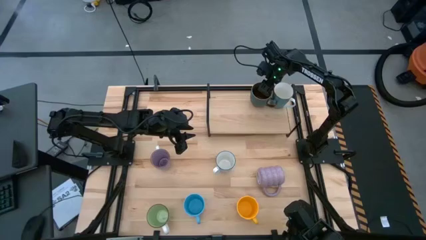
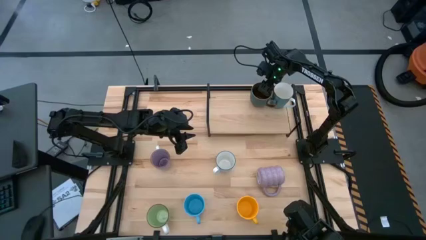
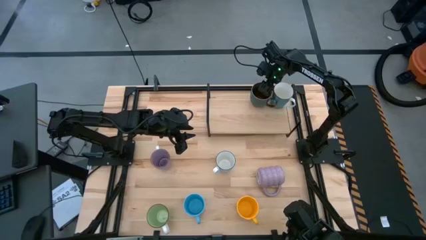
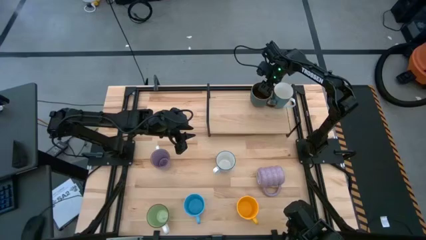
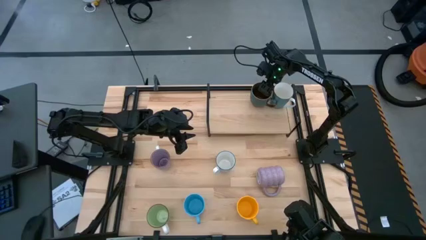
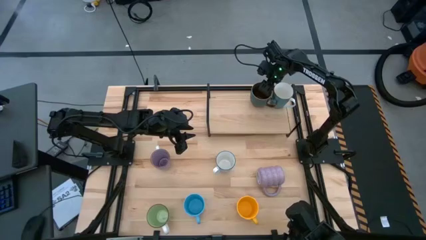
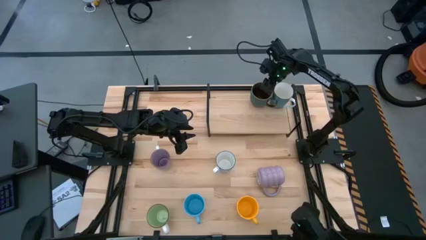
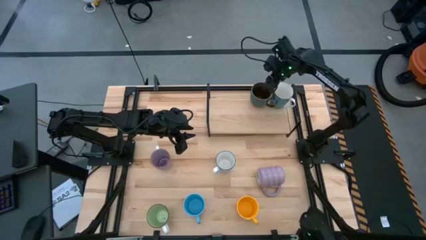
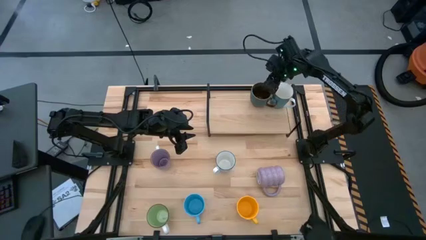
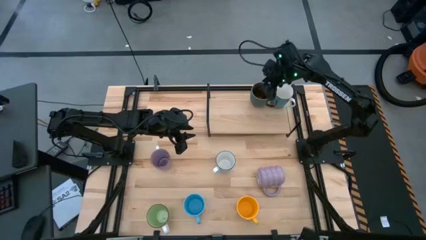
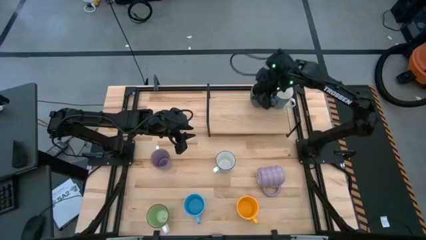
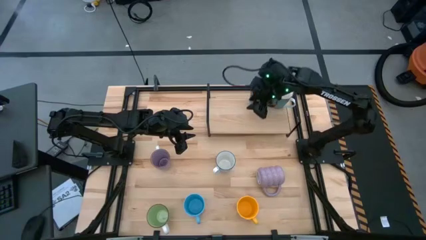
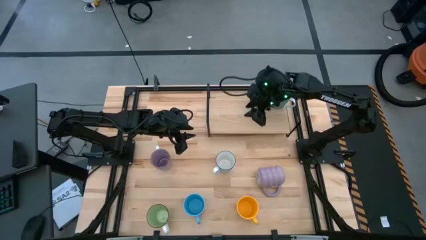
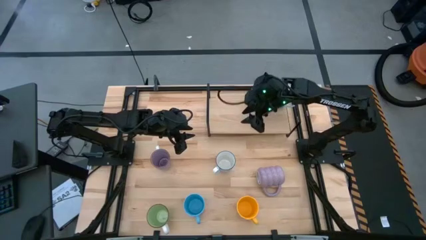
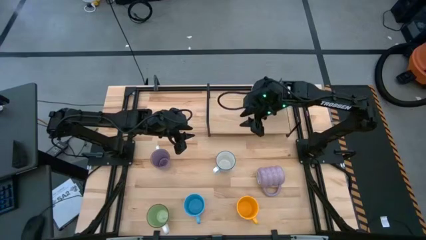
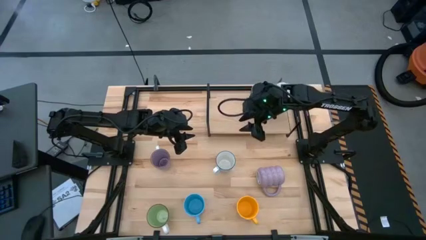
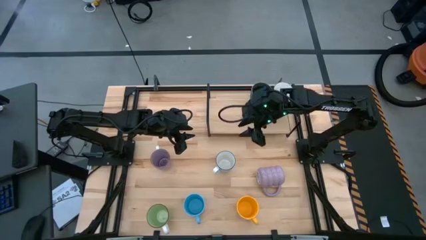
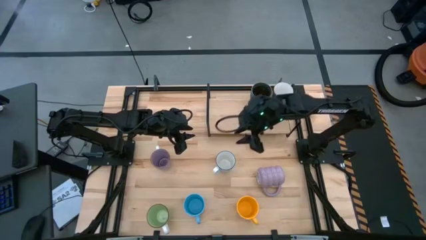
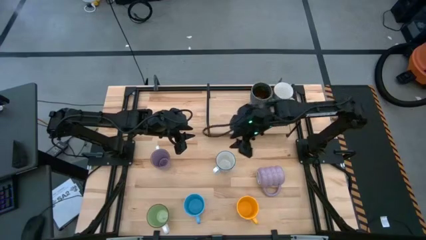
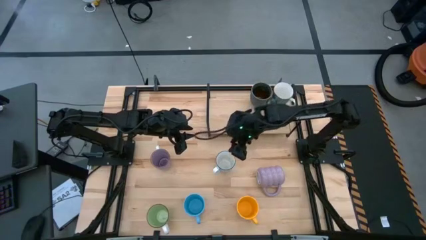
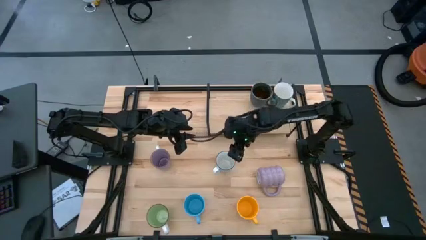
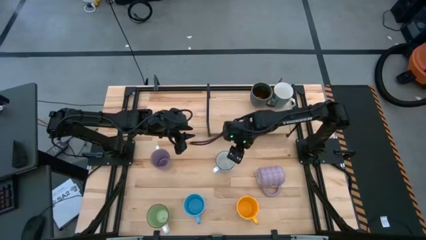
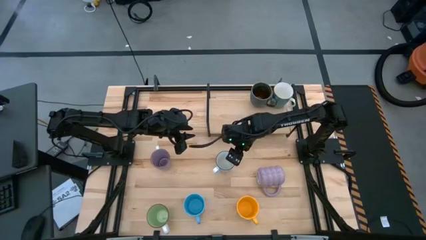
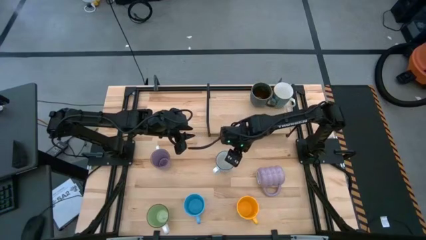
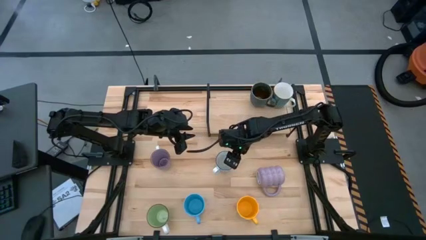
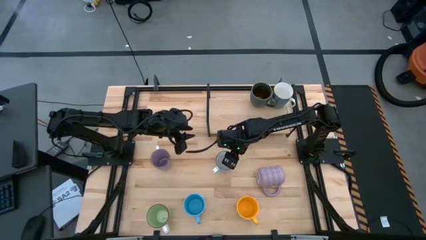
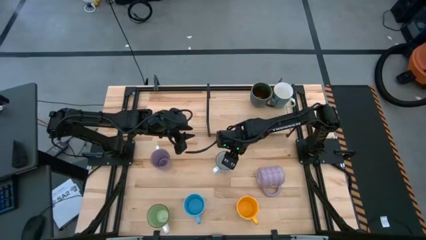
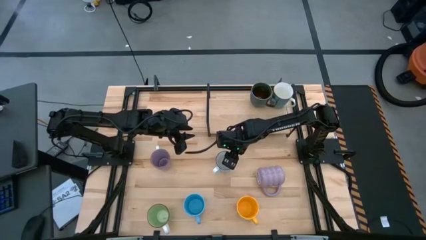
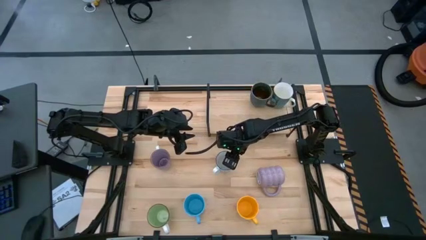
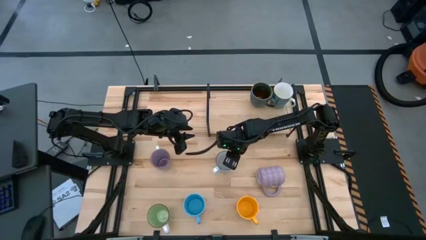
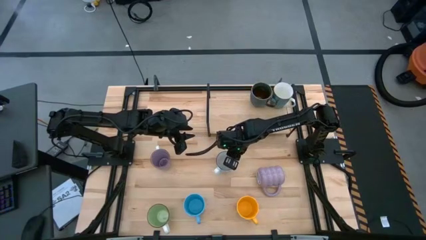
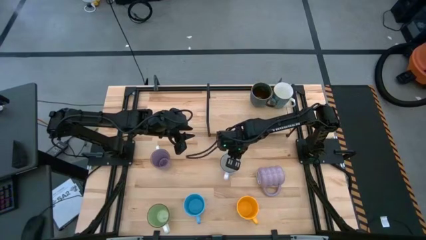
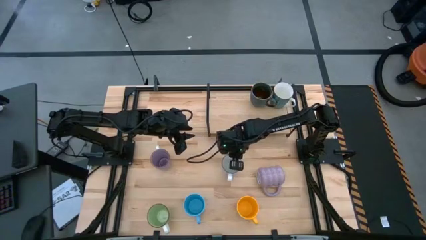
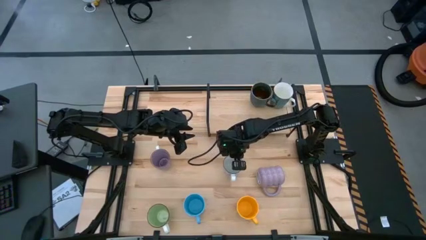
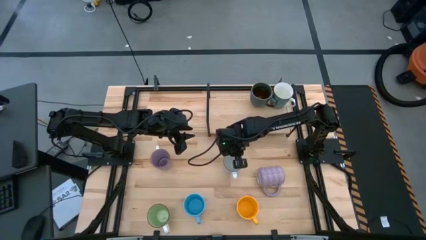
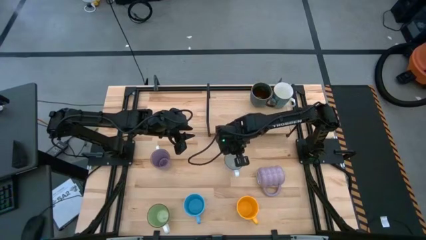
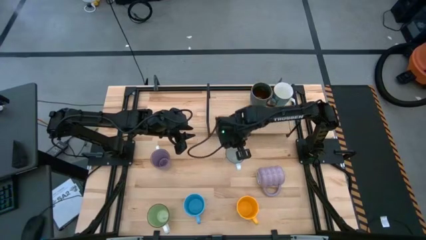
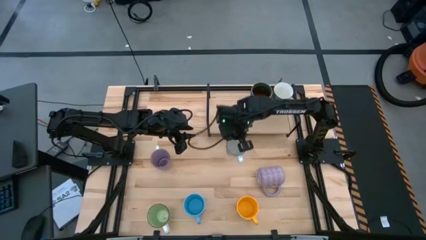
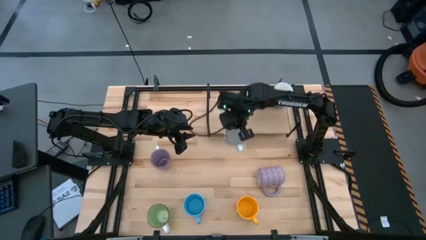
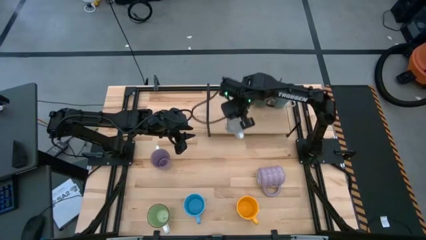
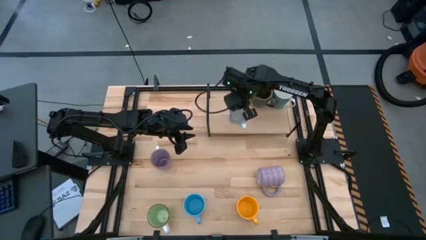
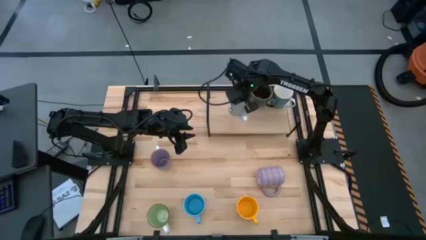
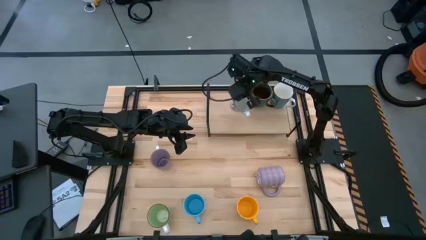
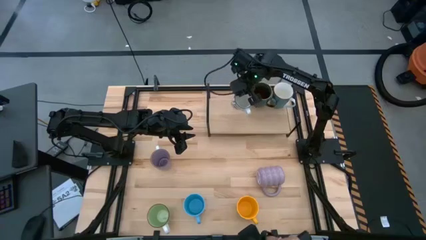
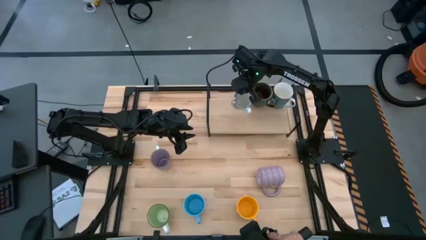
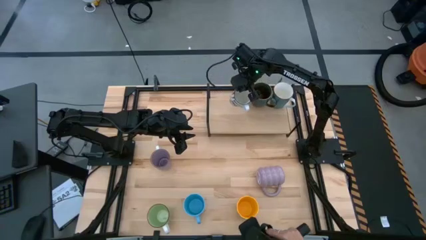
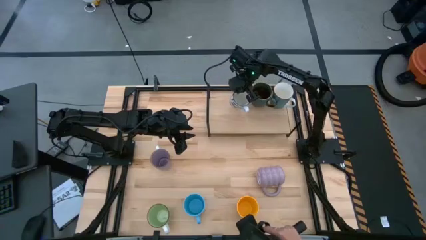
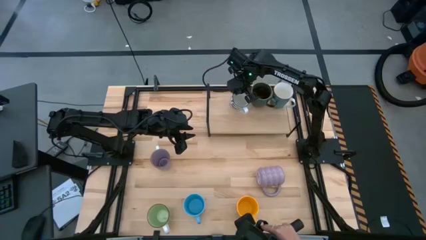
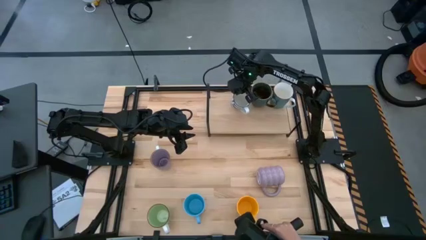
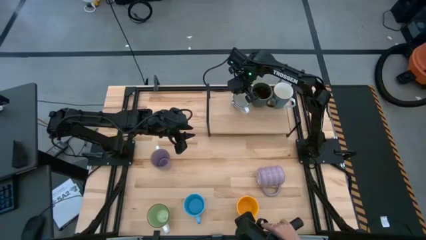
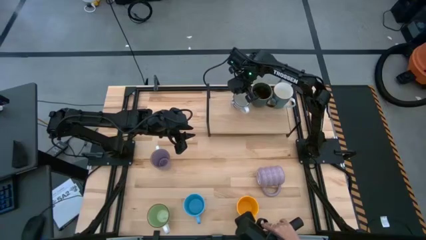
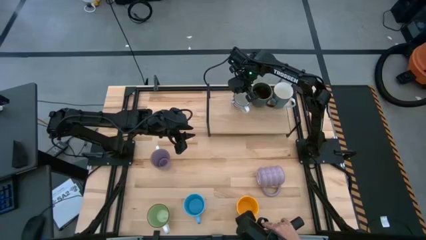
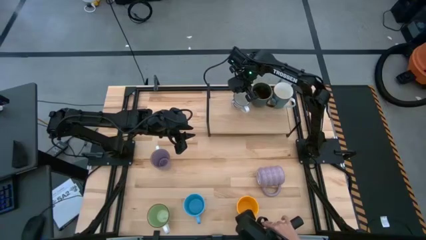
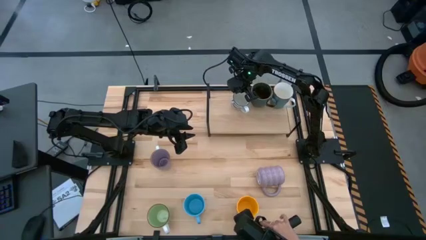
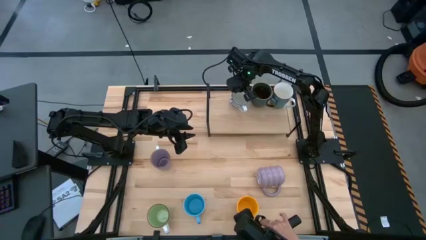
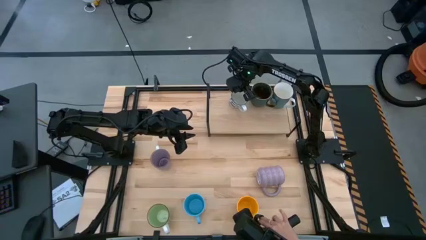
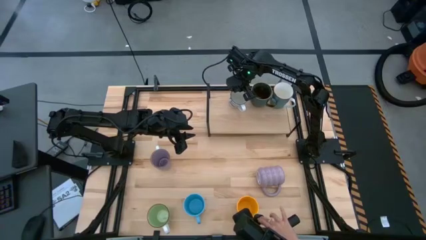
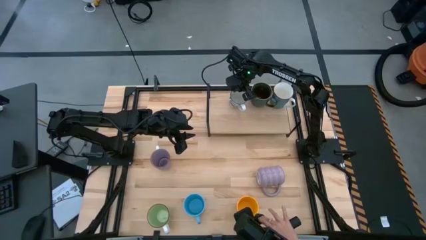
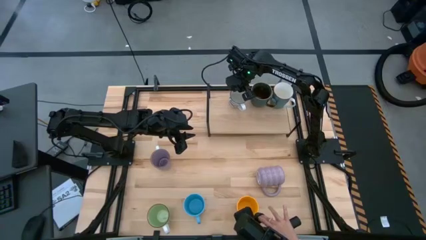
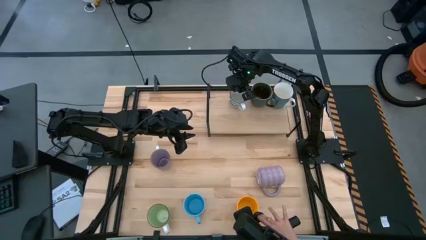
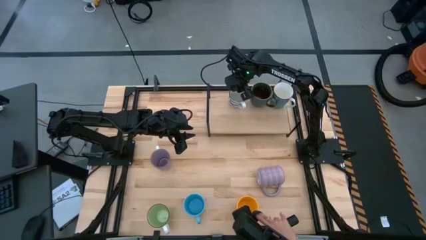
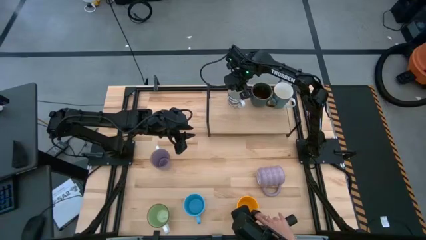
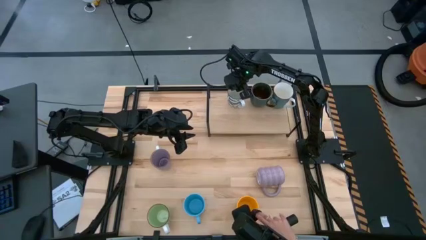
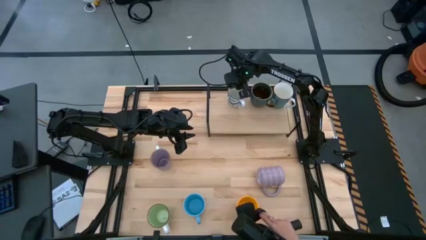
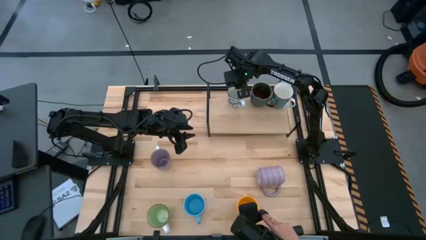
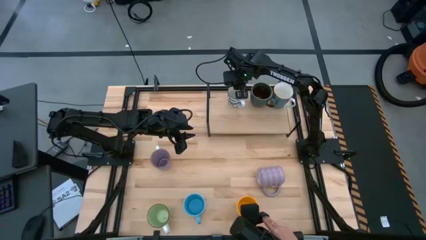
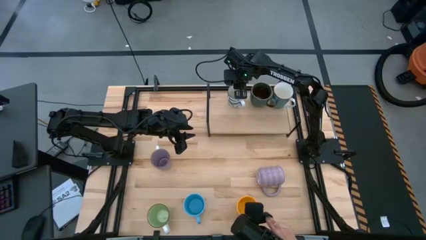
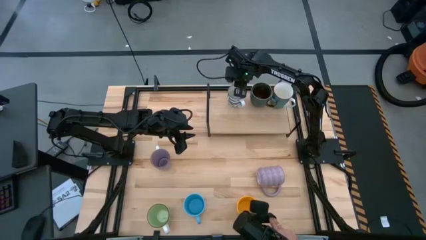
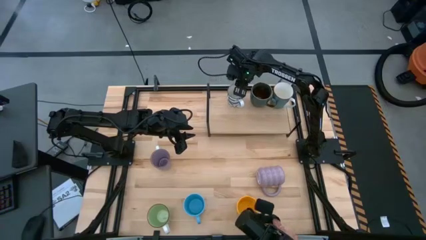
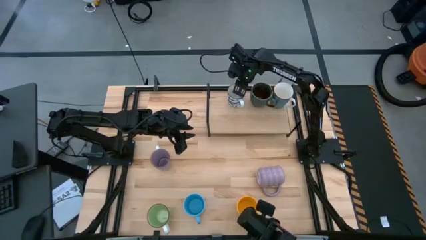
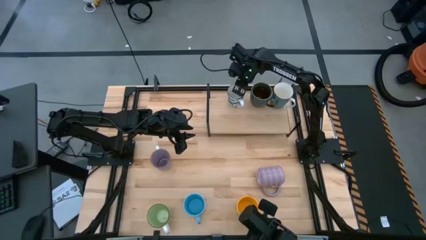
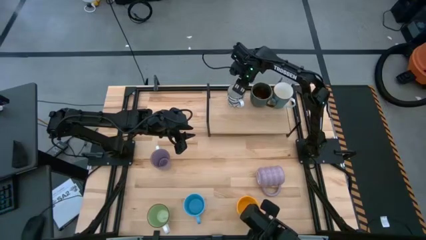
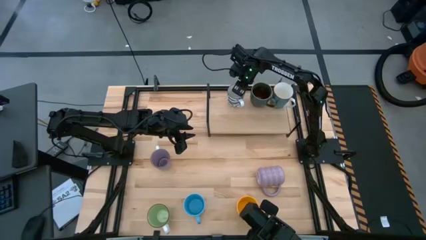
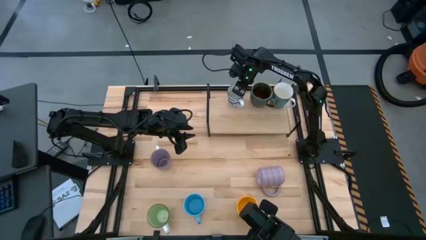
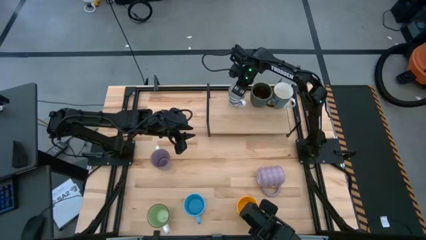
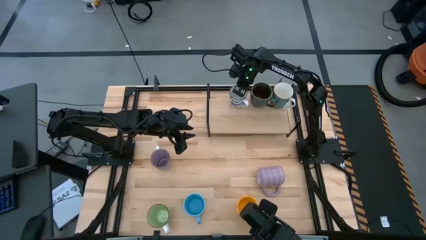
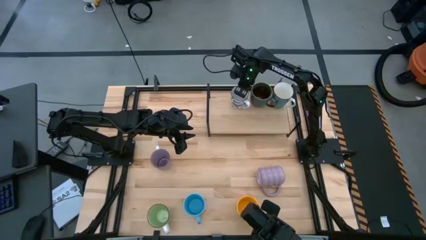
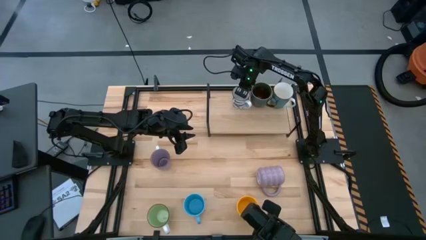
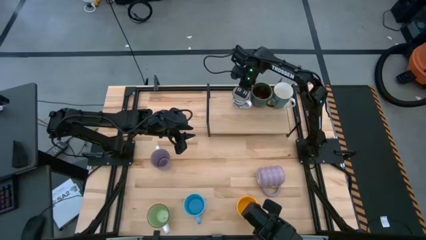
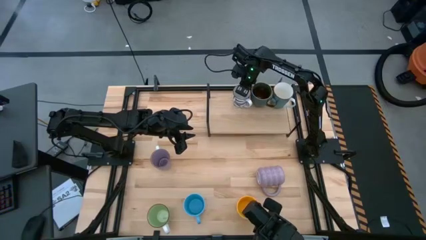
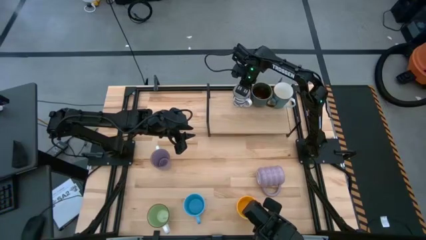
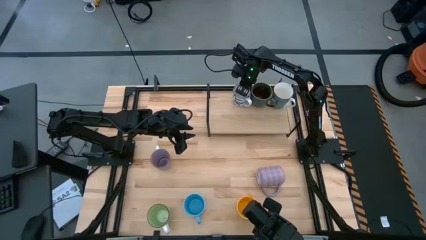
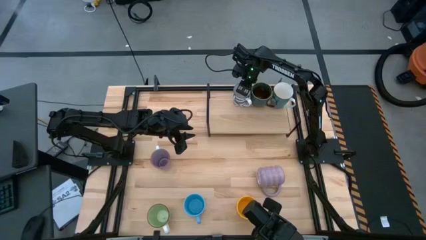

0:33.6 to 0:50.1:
Task: Place coffee mugs
Put the white patterned mug on the shelf

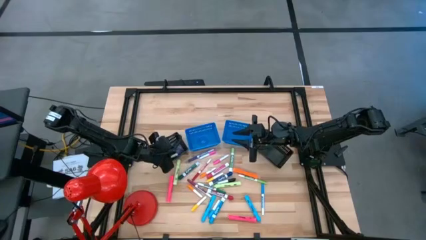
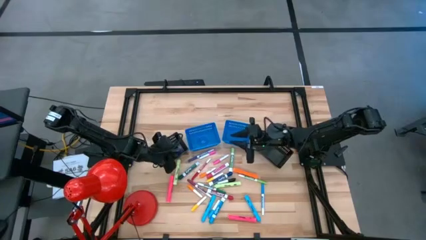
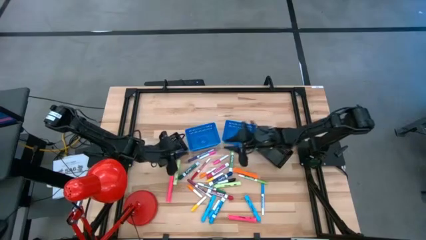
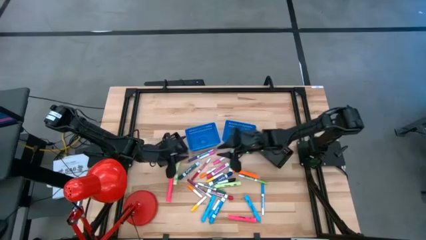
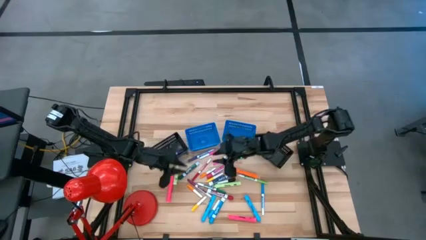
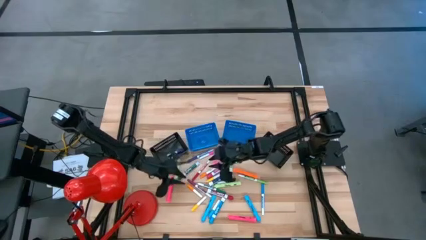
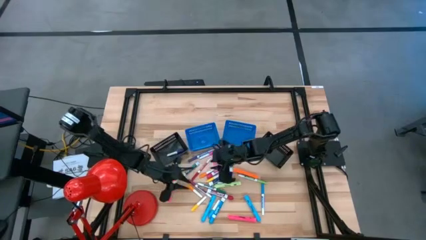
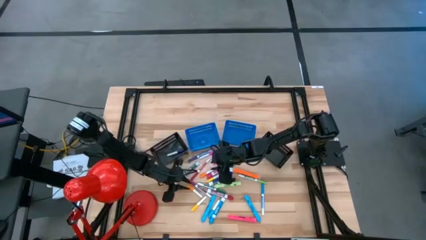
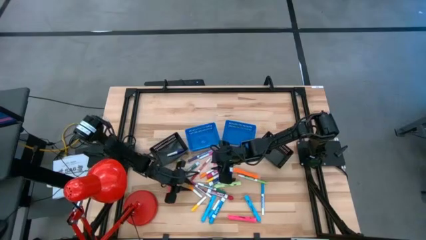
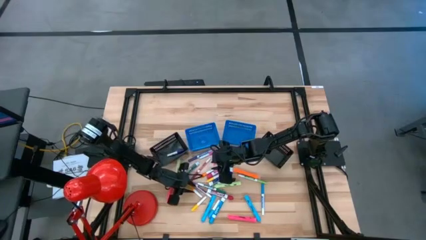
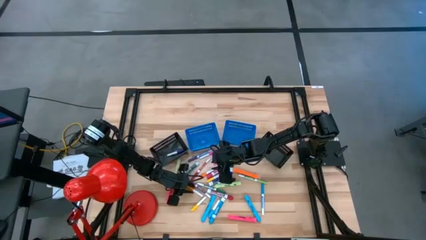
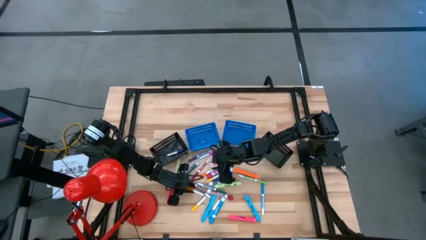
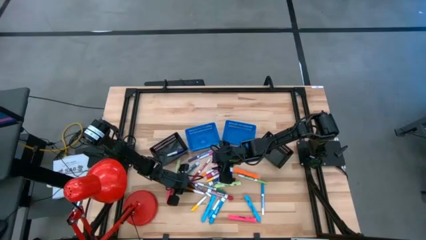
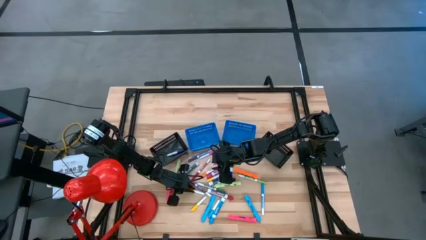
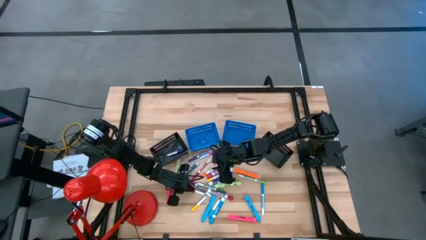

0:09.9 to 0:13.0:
Task: Pick & Place Markers
Put the orange water marker into the left black bin
